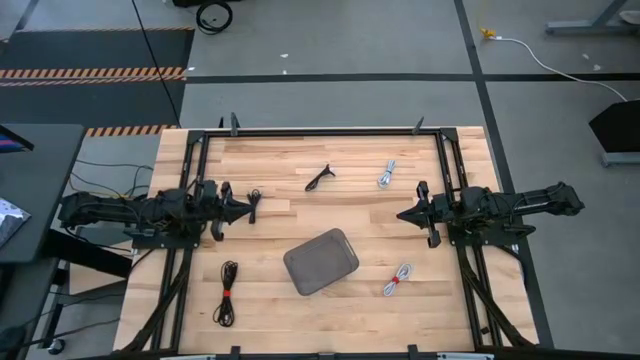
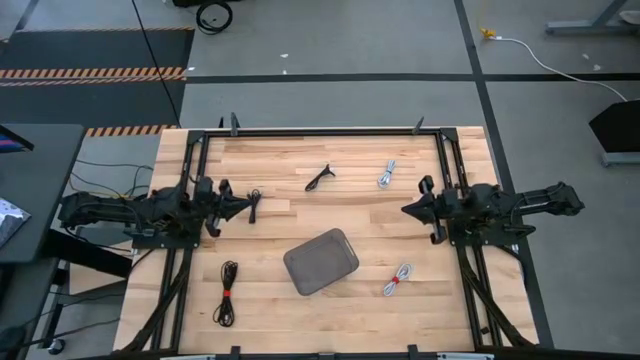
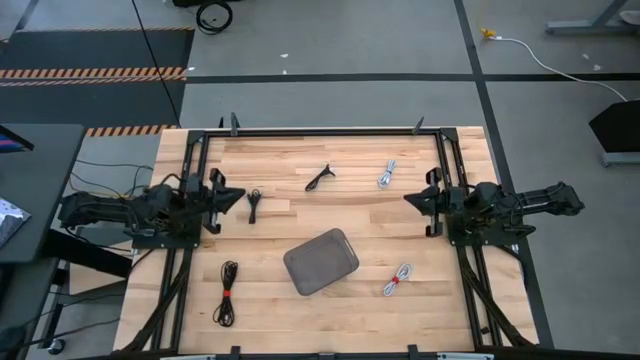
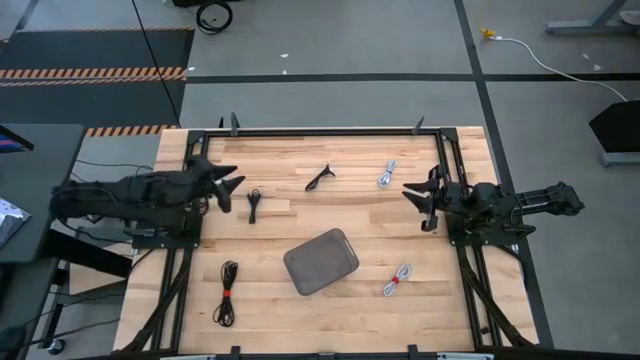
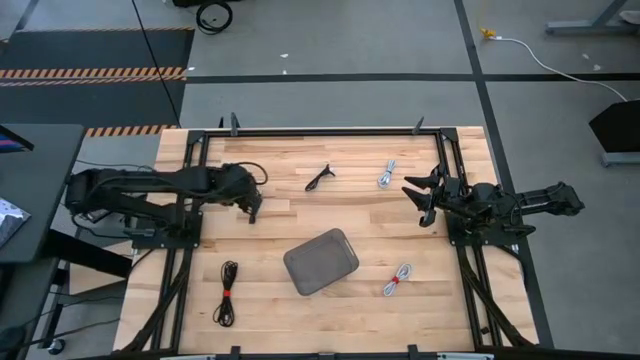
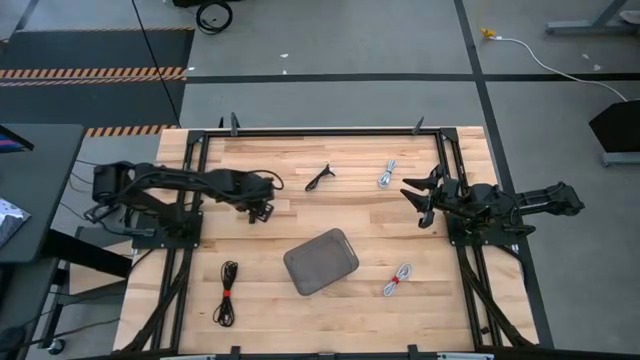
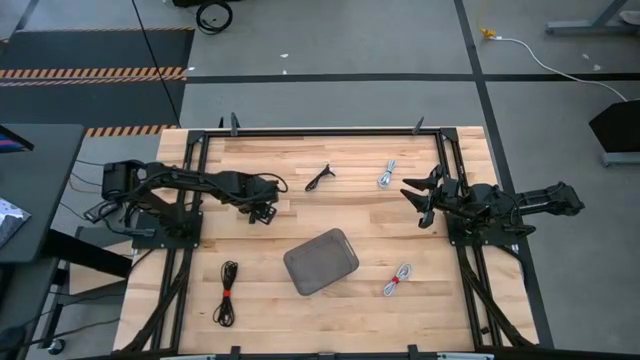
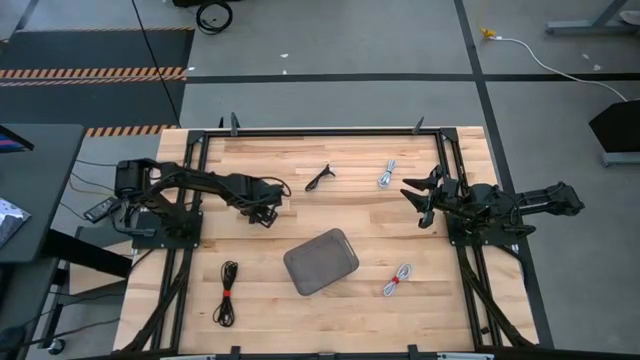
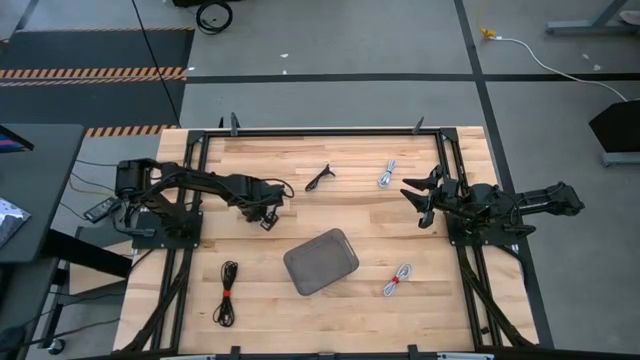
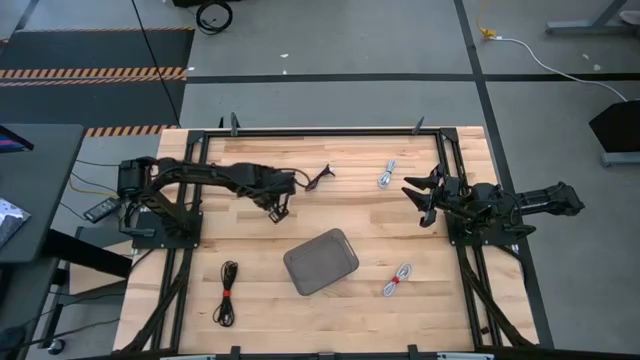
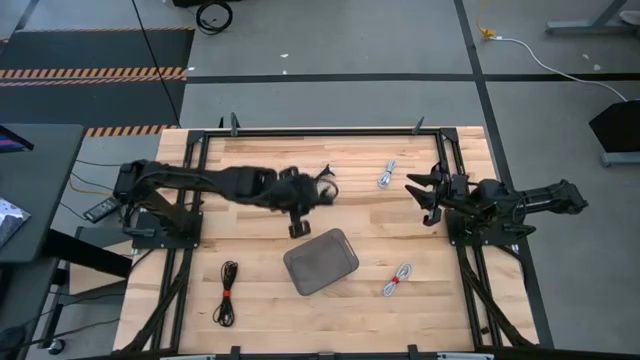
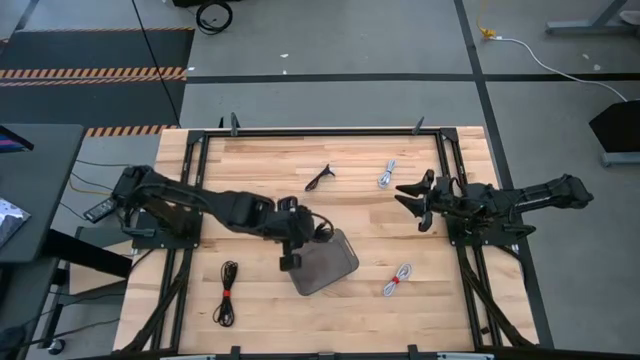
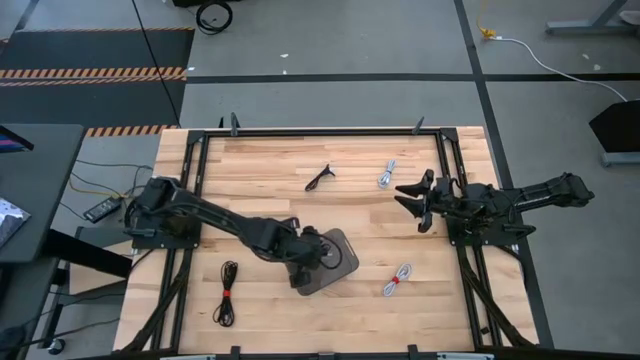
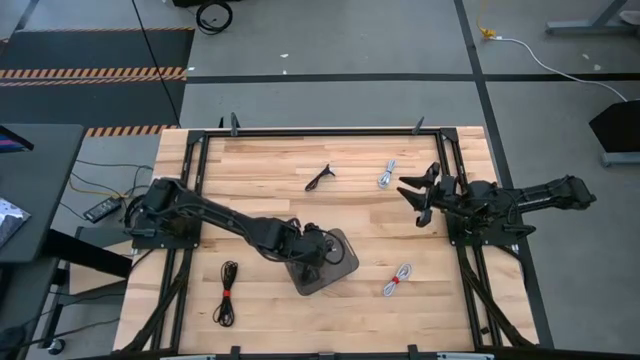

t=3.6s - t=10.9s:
Task: Pick and place USB-C Cables
Put the middle black charger cable into the black bin

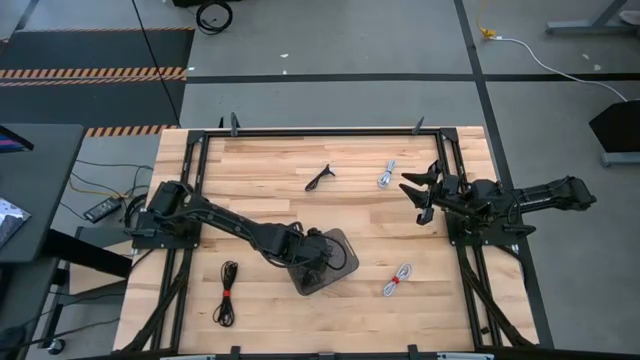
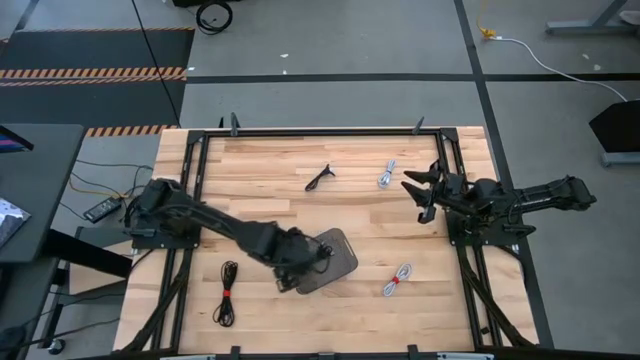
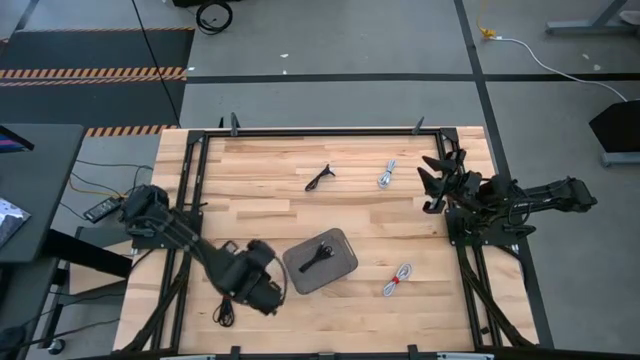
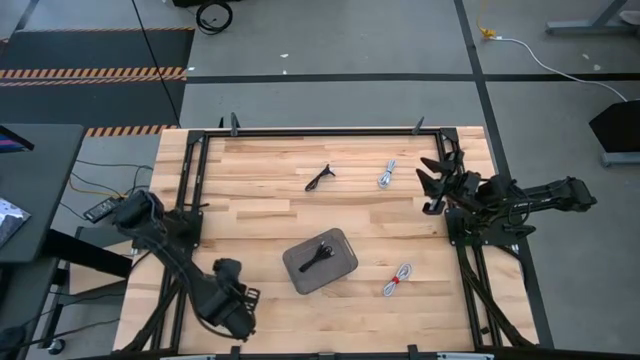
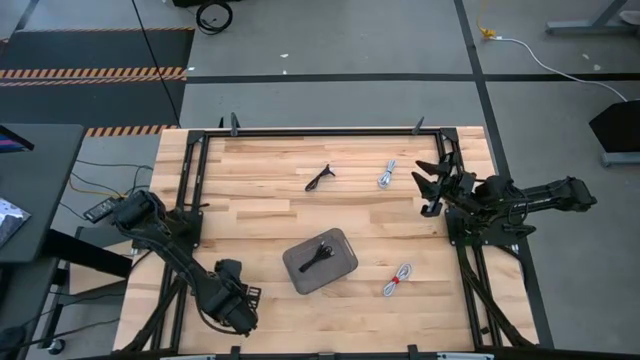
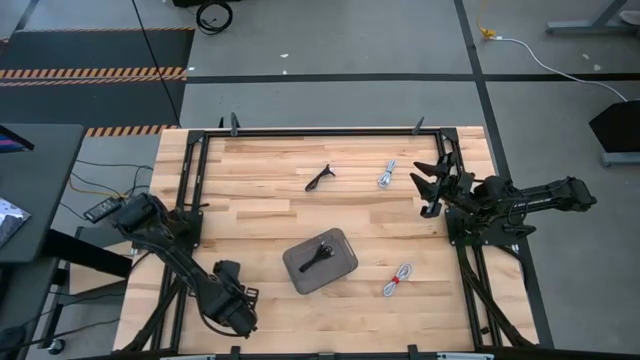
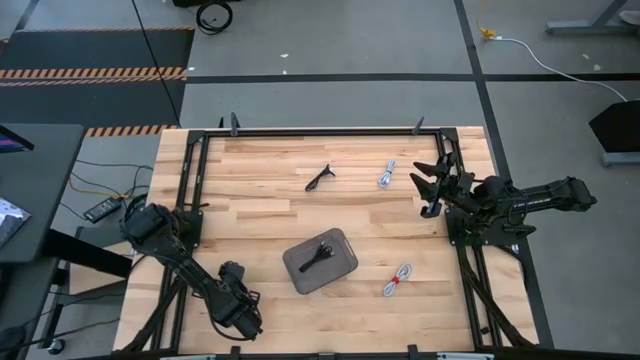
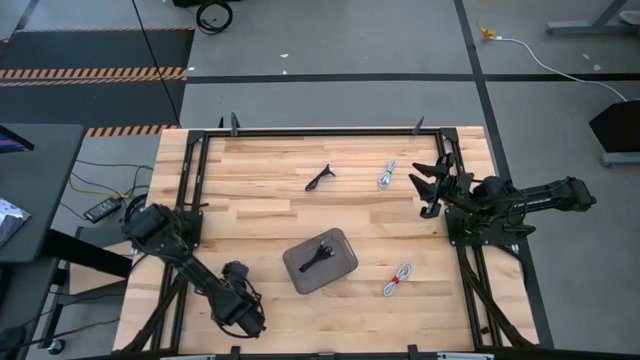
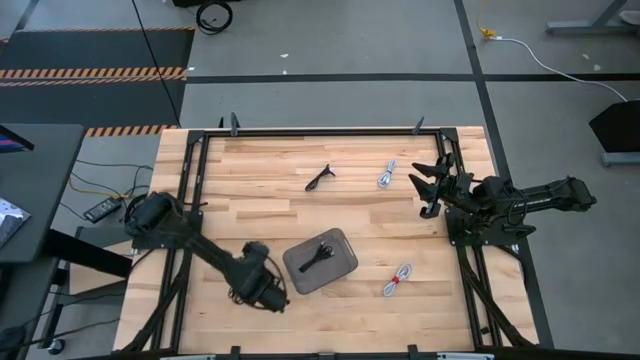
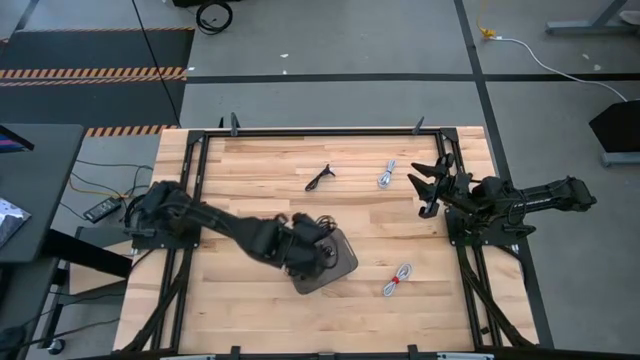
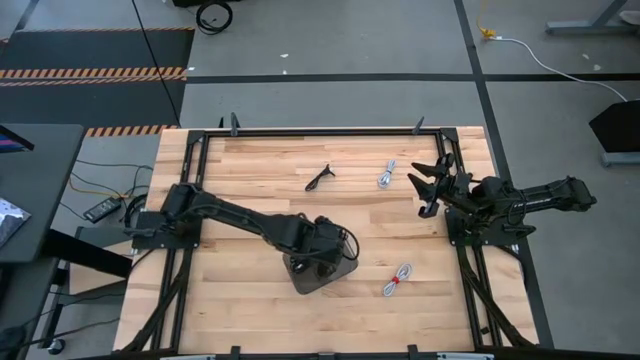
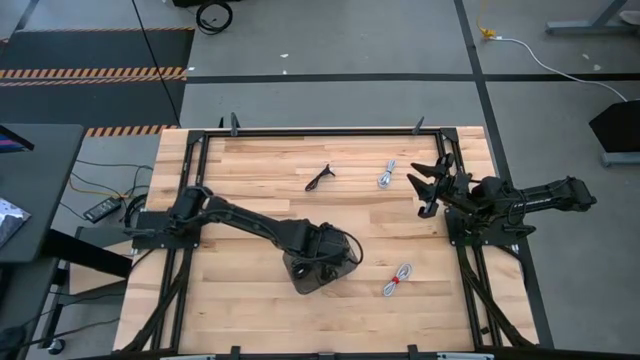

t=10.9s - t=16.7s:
Put the bottom black charger cable into the black bin

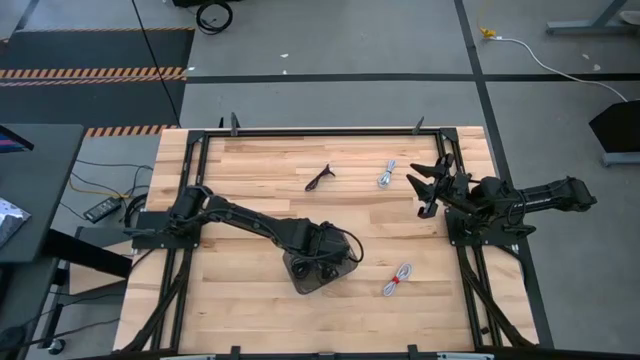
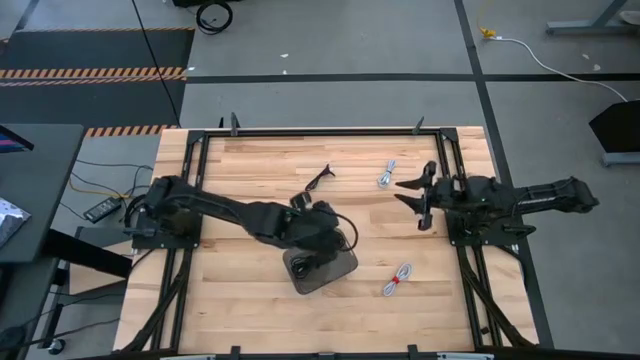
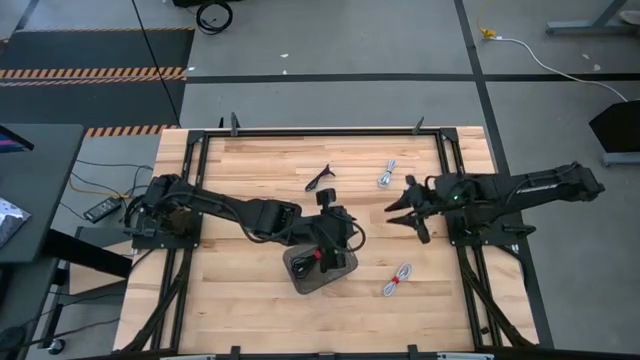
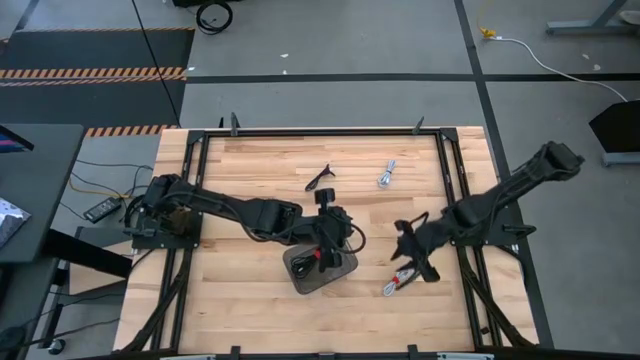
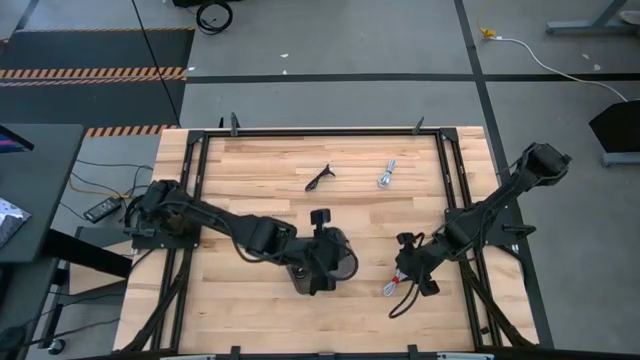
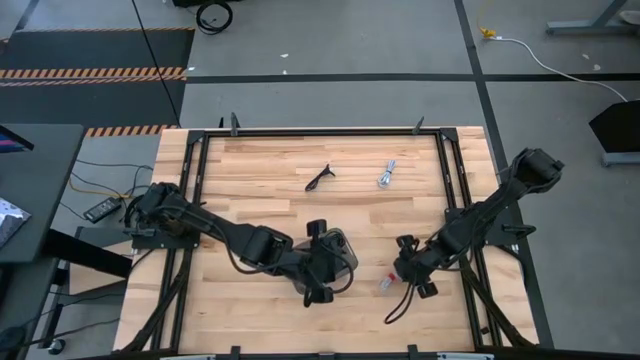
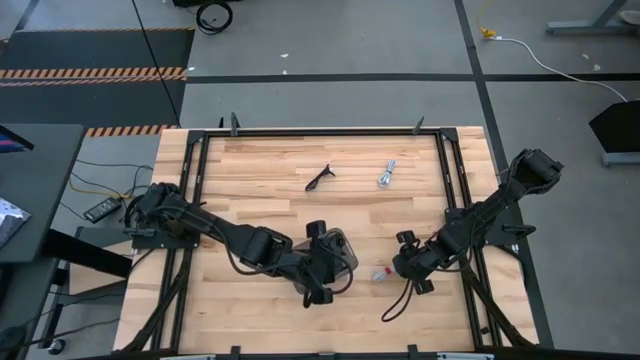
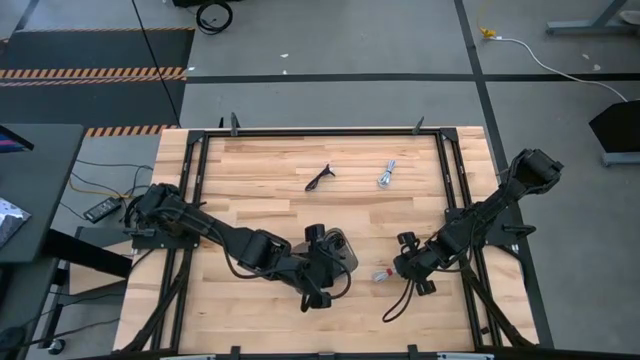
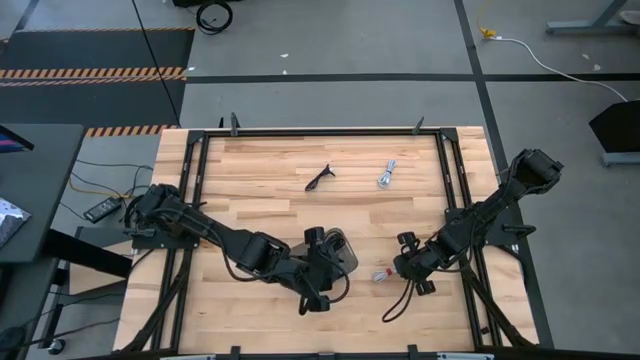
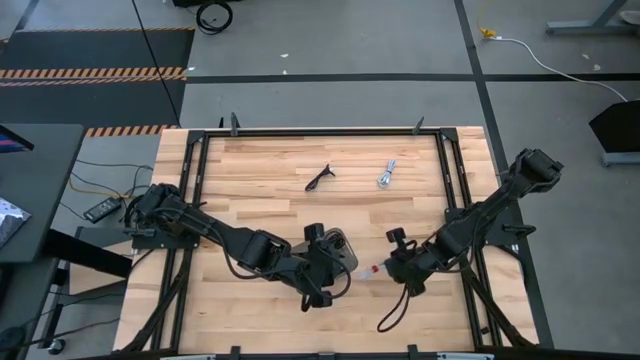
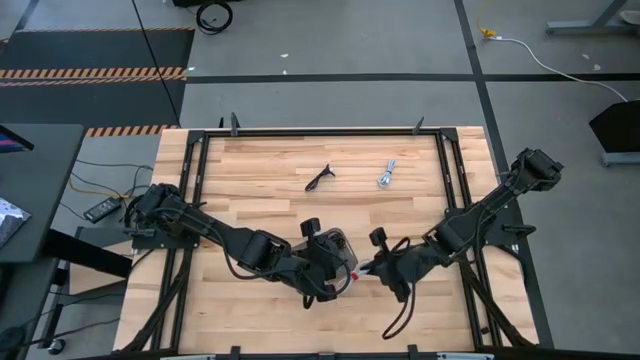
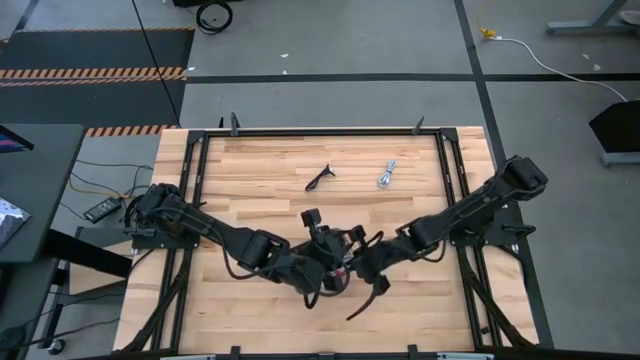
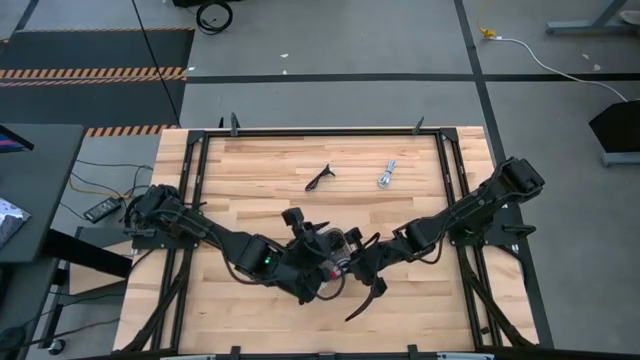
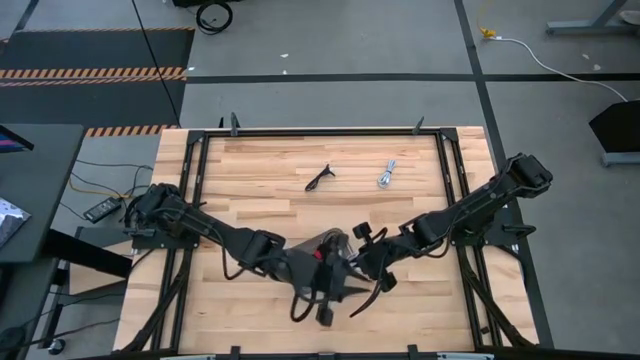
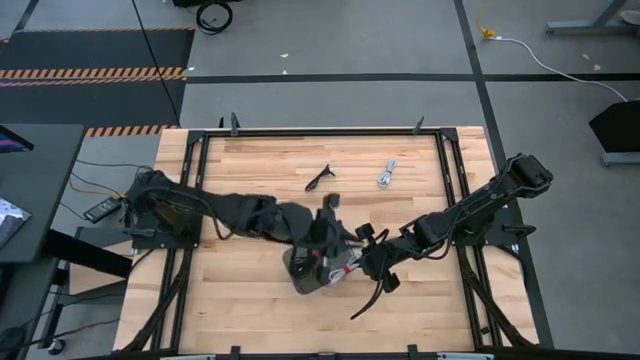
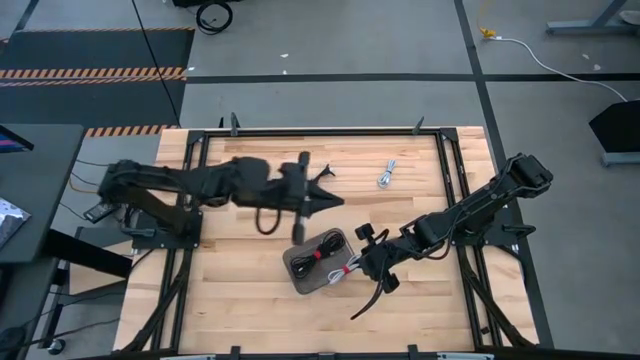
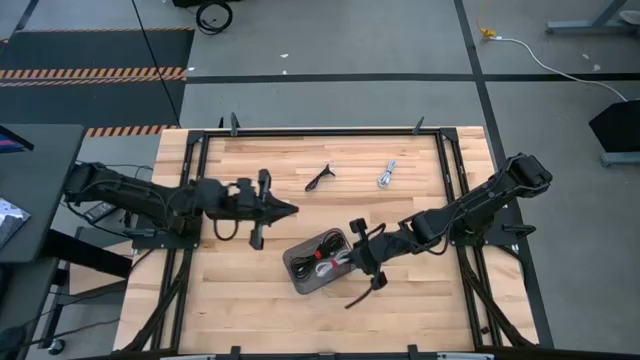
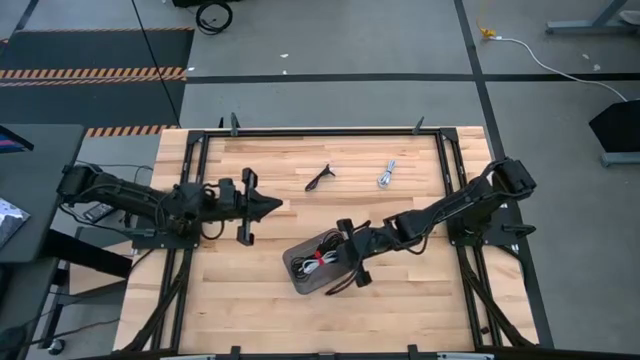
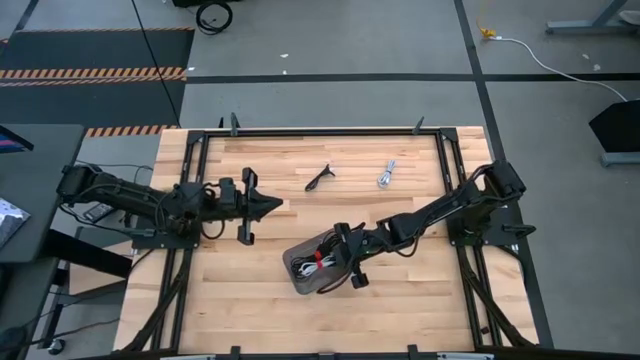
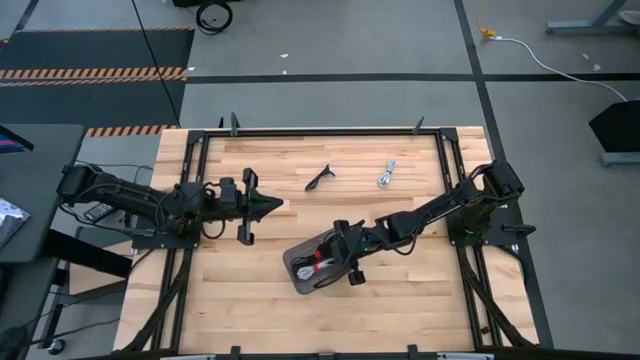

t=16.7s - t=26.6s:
Put the bottom white charger cable into the black bin
